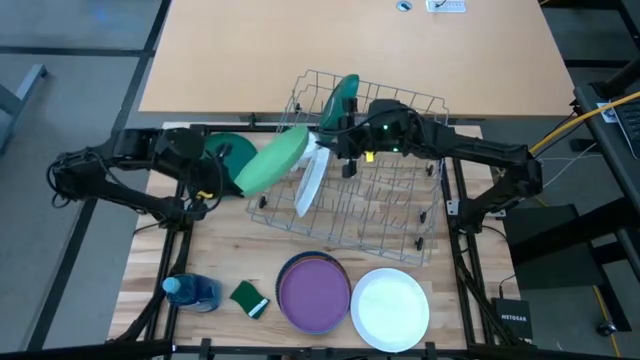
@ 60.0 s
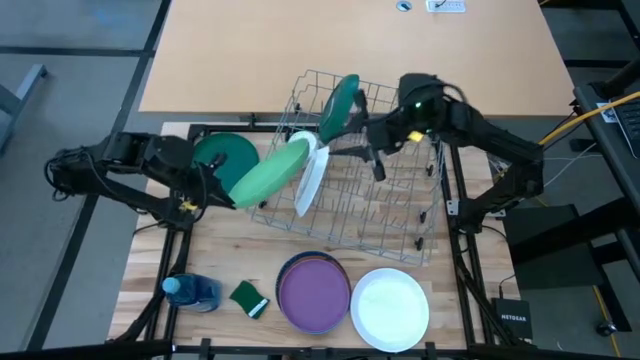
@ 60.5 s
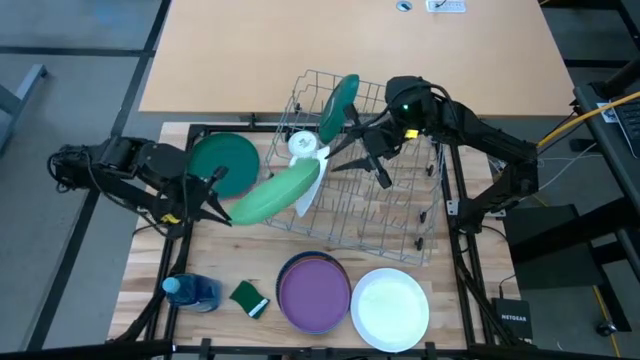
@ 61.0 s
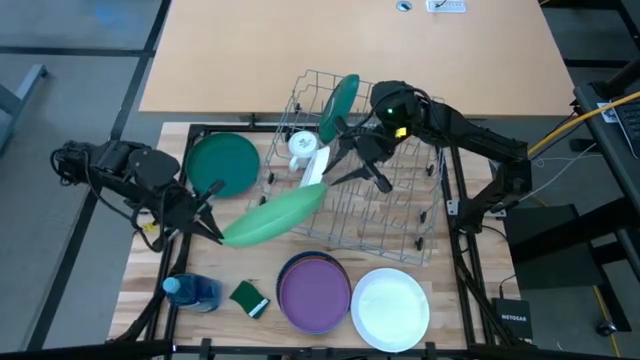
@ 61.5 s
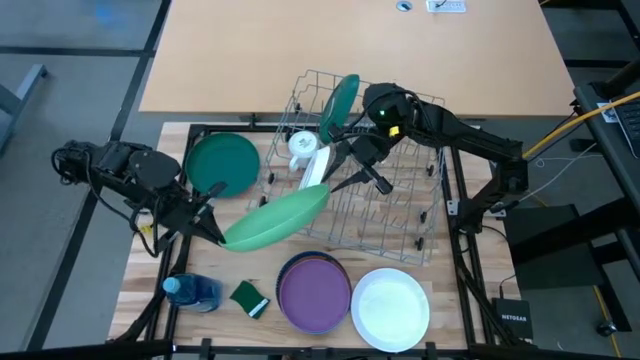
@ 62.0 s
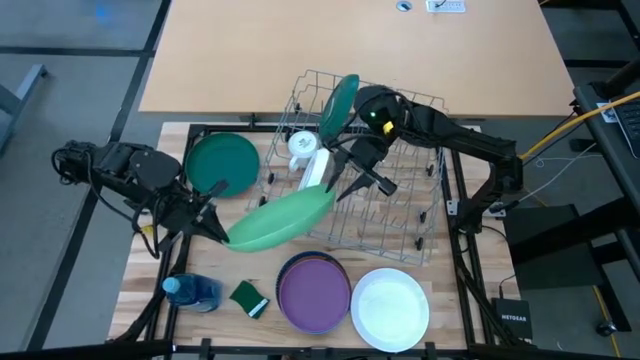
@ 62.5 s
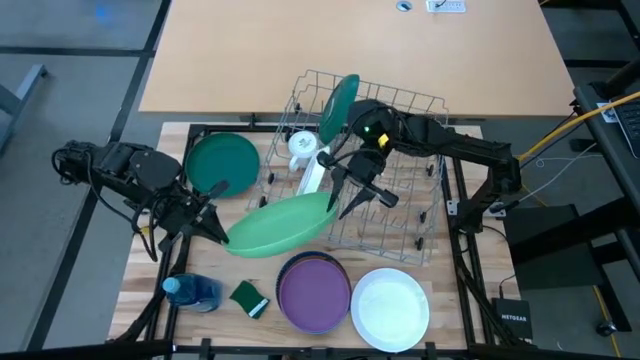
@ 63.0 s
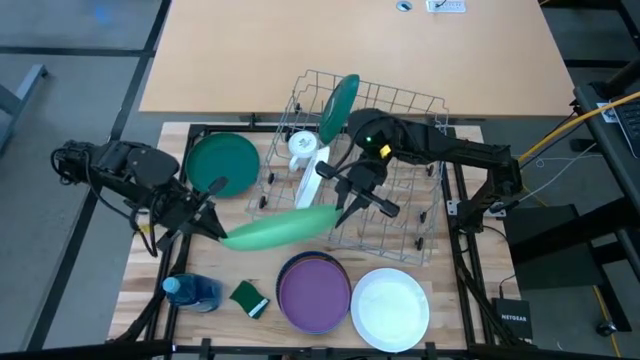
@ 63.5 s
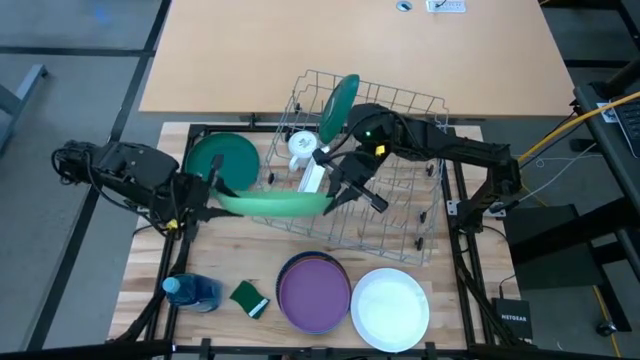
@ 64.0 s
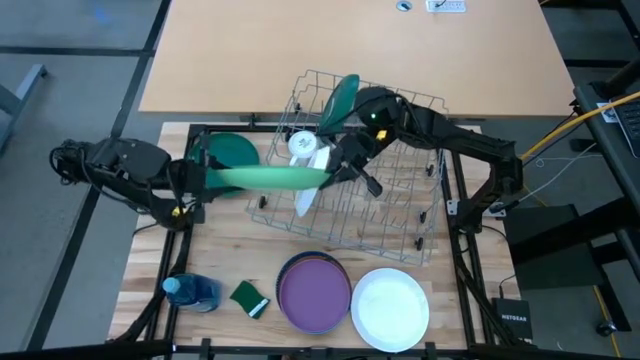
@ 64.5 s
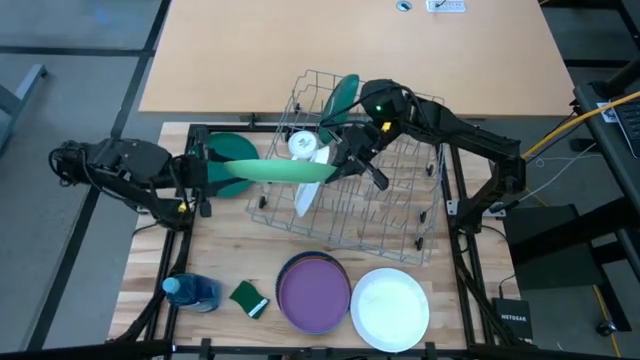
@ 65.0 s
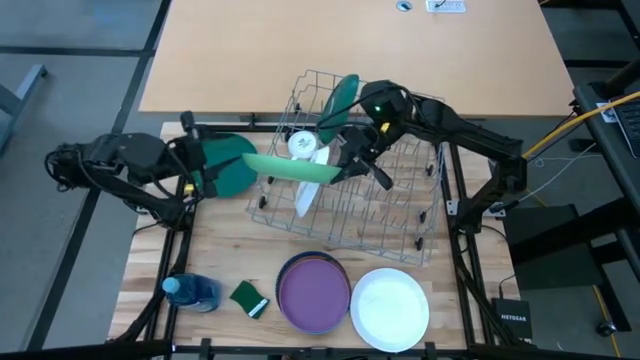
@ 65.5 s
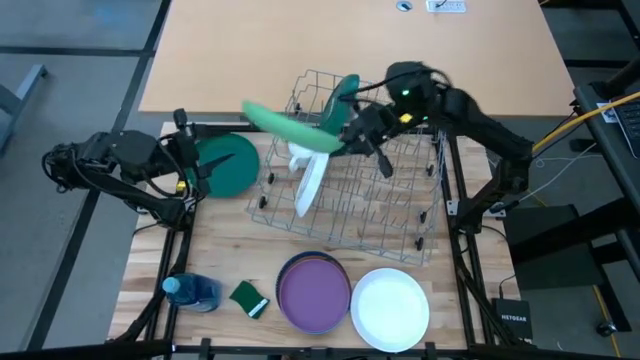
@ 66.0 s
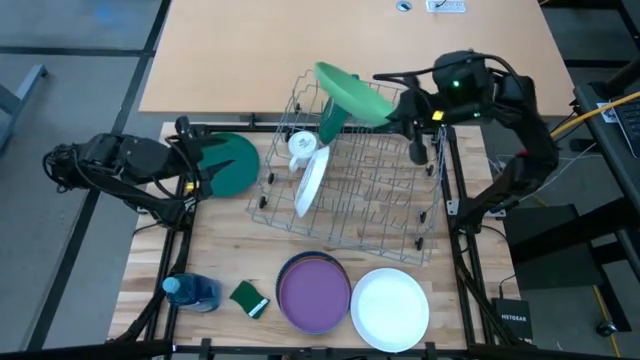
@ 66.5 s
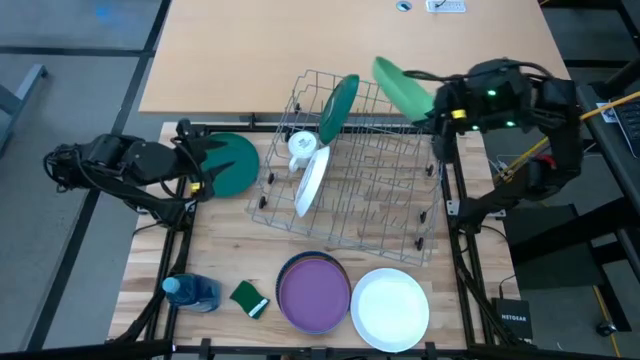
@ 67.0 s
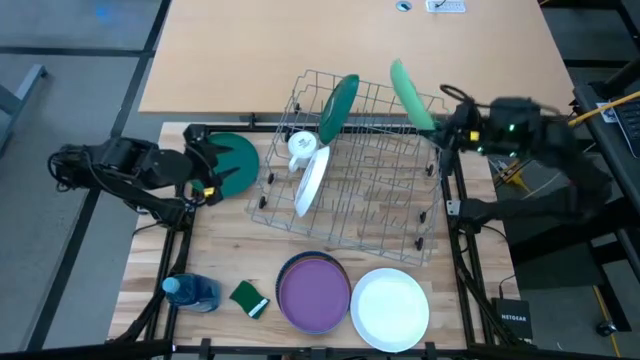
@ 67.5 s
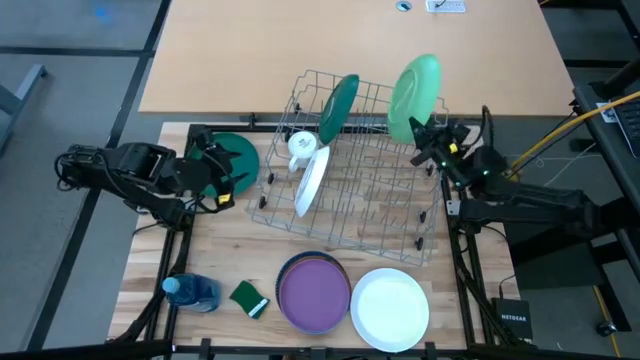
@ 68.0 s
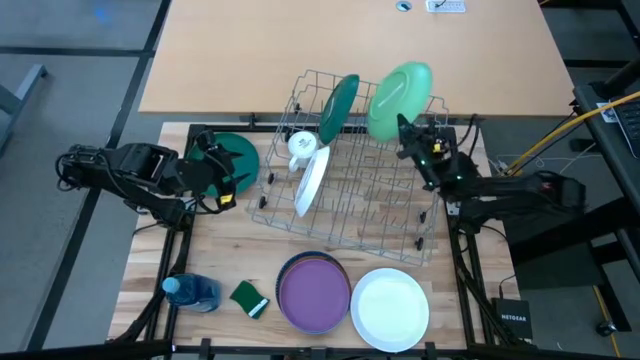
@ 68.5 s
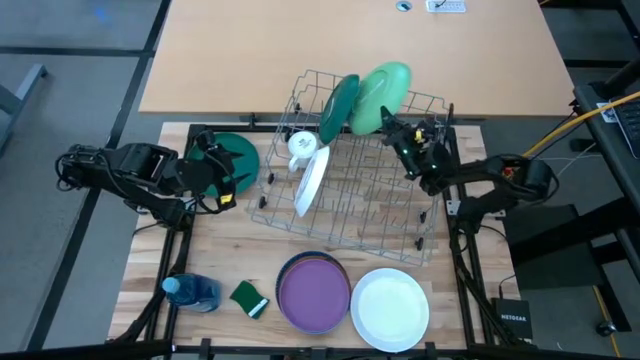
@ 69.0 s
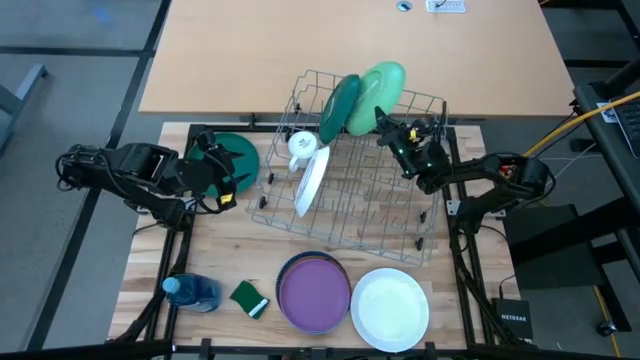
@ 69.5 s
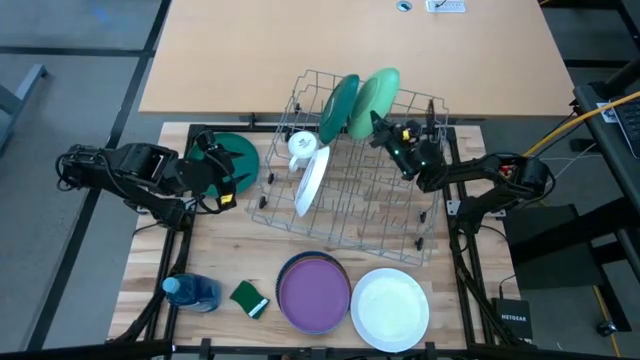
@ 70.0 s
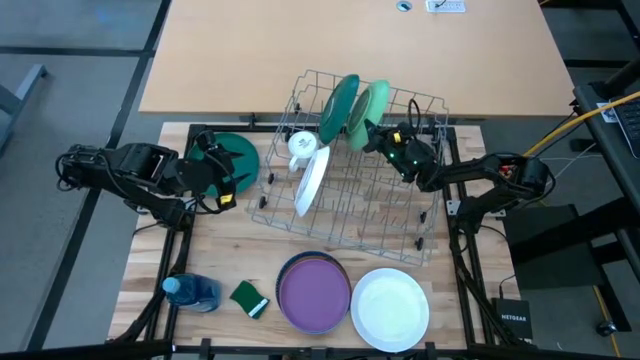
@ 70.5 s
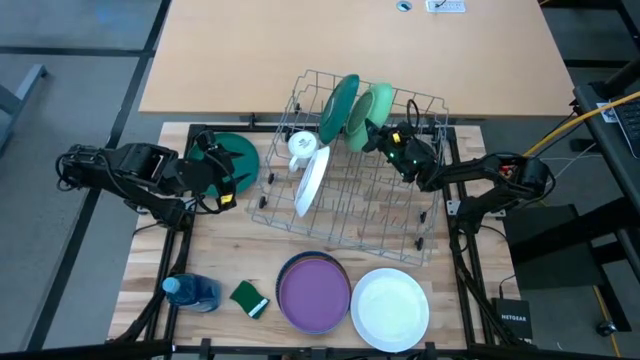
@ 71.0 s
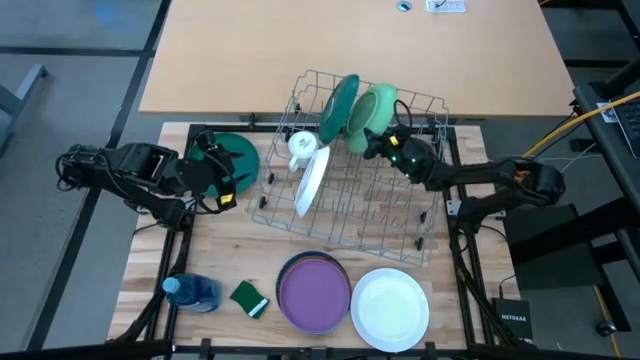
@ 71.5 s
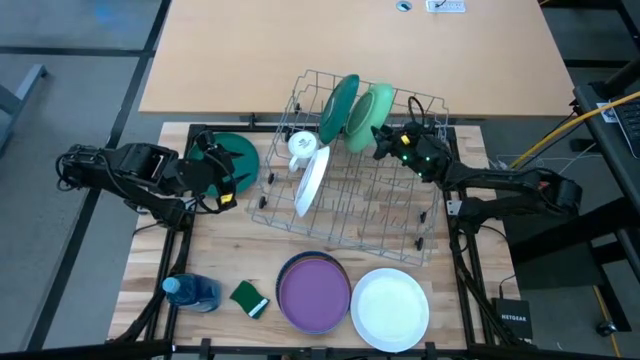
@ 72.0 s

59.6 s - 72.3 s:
Task: Sort dishes
Put the green plate in the dish rack

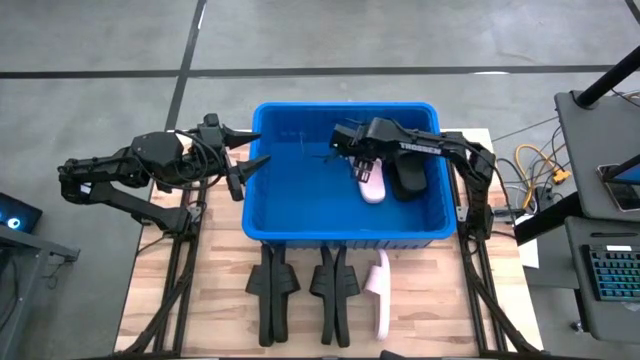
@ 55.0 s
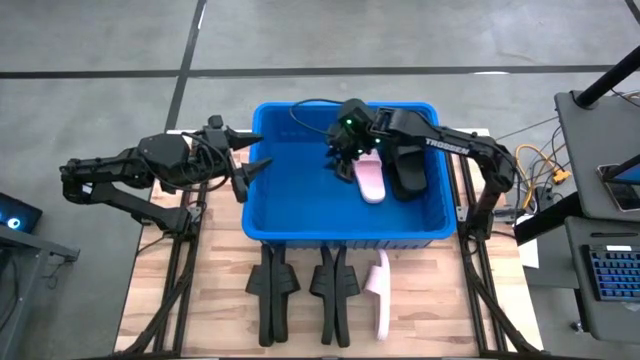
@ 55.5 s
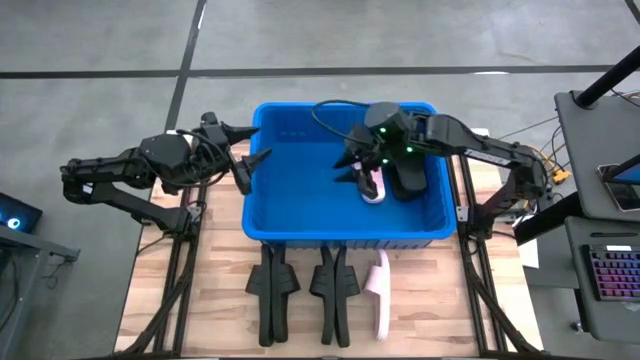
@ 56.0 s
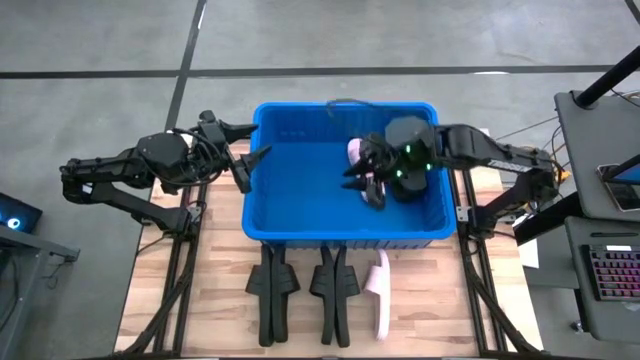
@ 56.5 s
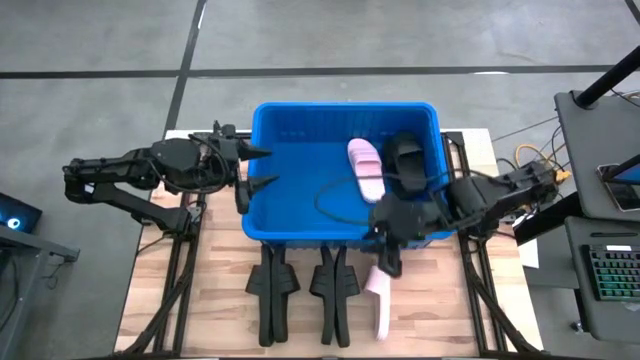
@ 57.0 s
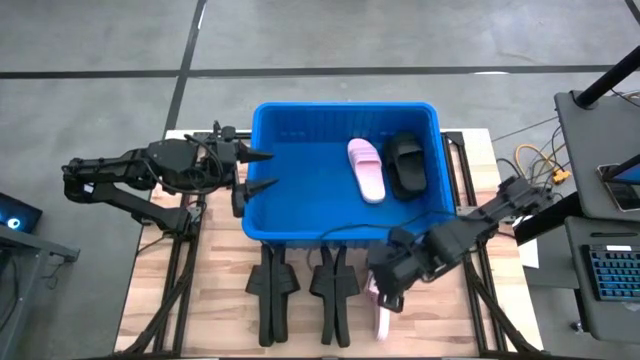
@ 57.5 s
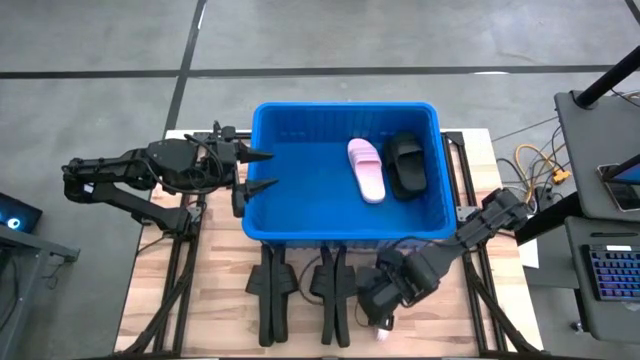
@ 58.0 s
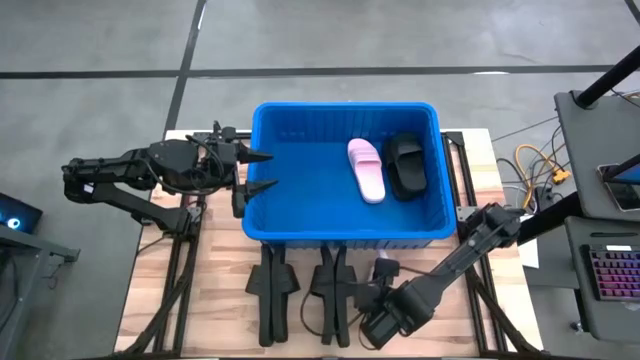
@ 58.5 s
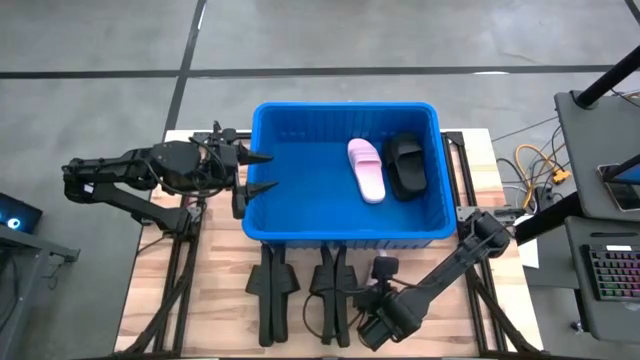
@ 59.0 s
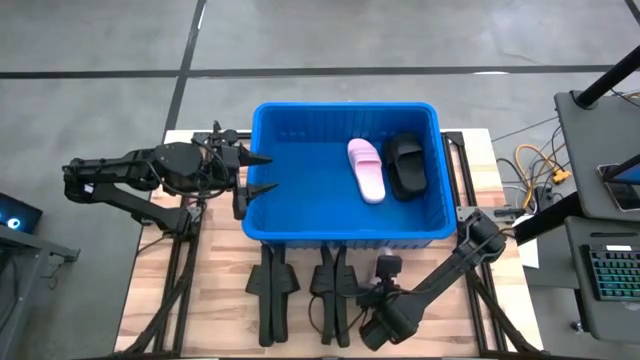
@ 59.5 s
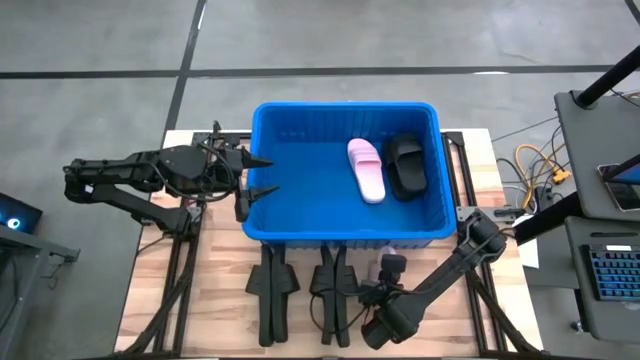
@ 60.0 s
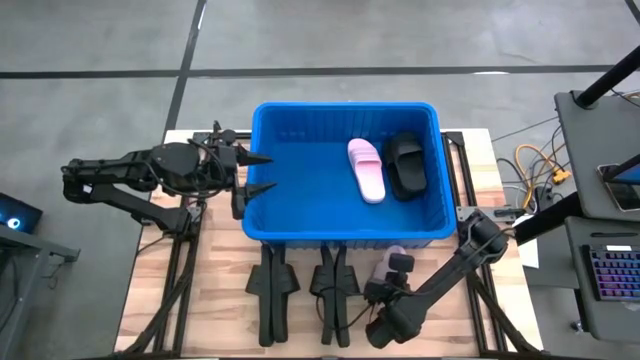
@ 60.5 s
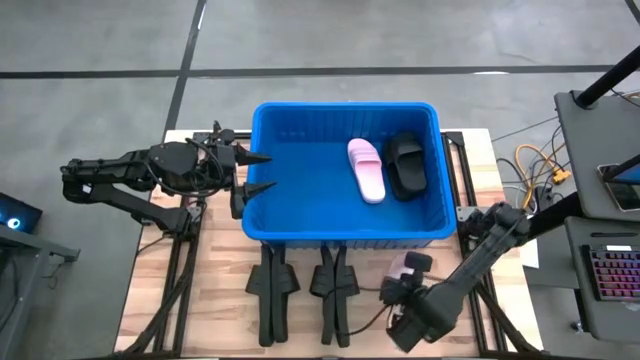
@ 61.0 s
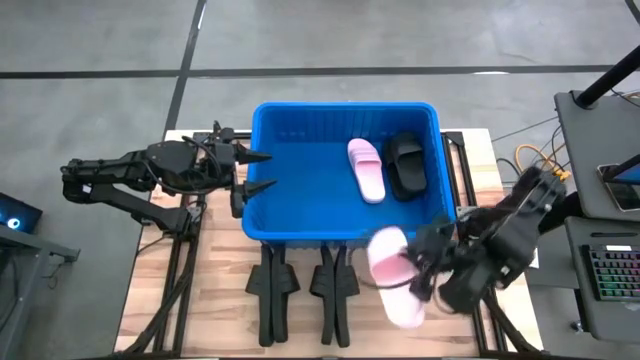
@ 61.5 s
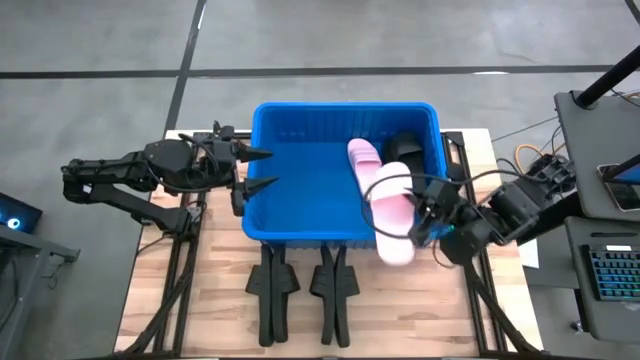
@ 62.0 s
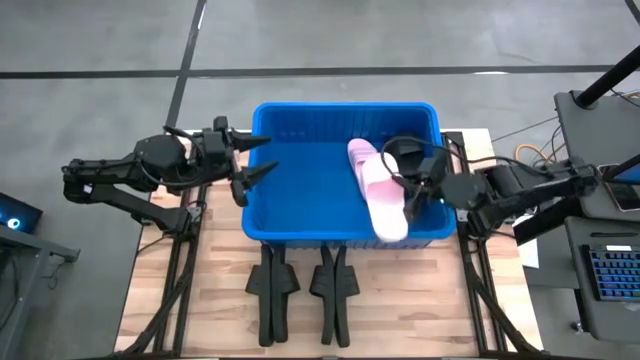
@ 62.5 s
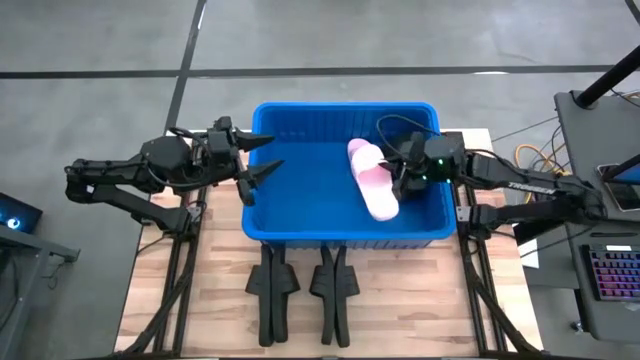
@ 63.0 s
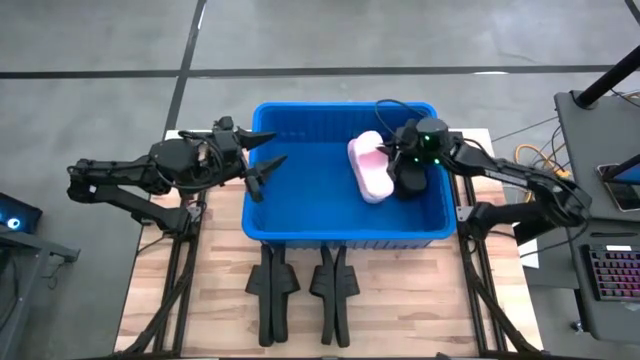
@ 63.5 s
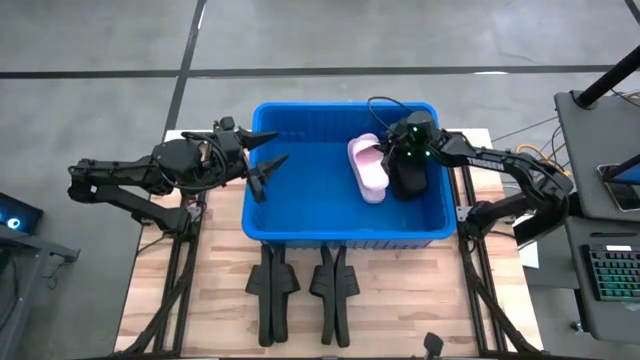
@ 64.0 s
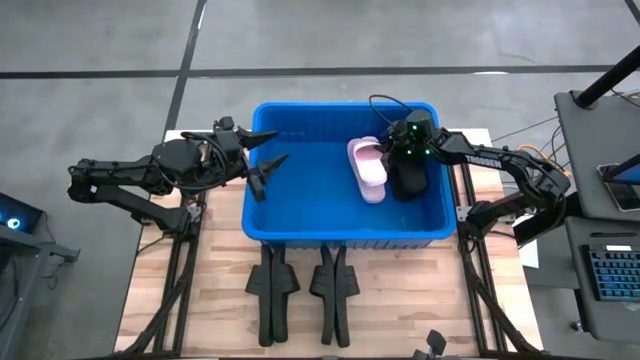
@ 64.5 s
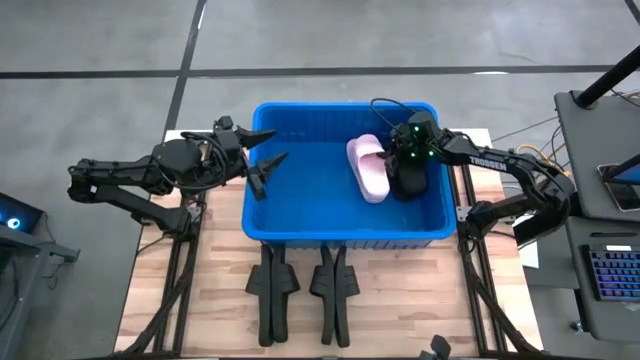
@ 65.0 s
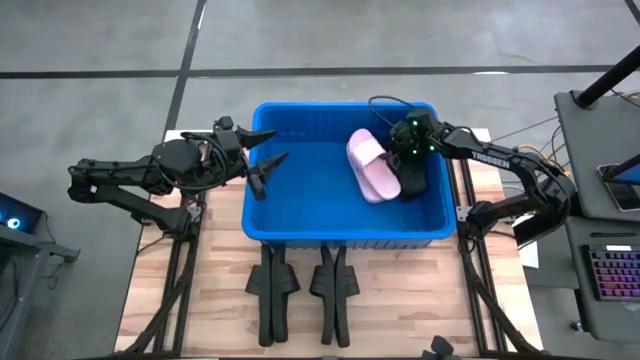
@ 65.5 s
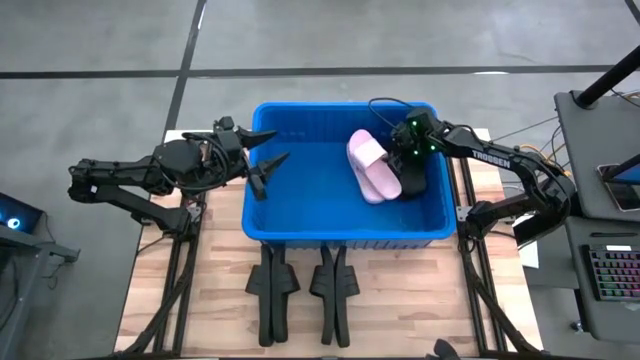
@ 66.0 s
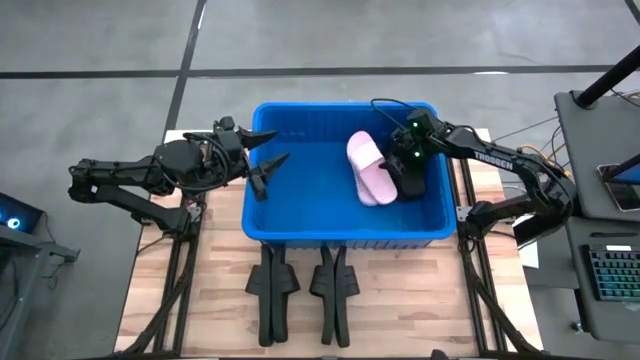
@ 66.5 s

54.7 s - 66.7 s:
Task: Pick and place slides into bin
Put the pink slide into the blue bin
